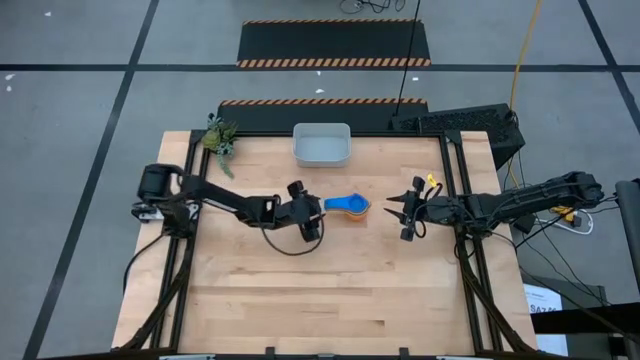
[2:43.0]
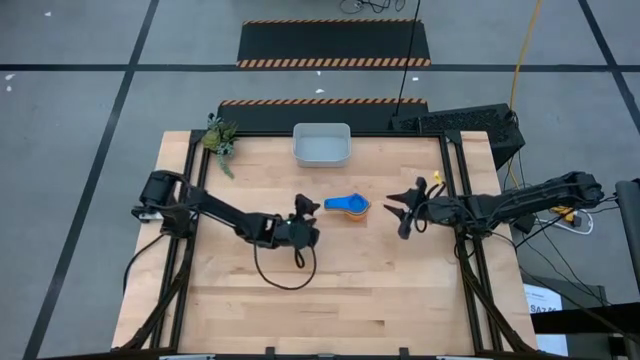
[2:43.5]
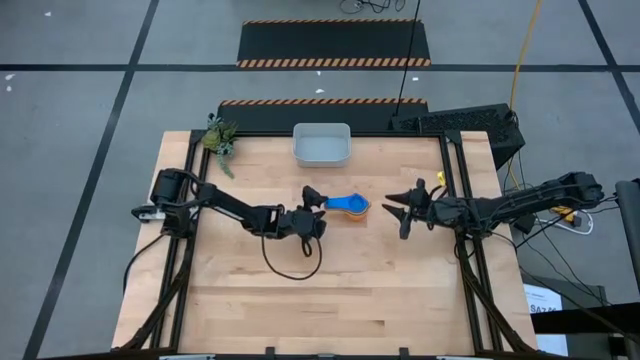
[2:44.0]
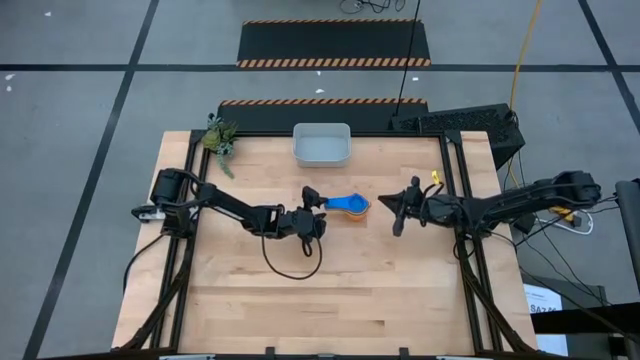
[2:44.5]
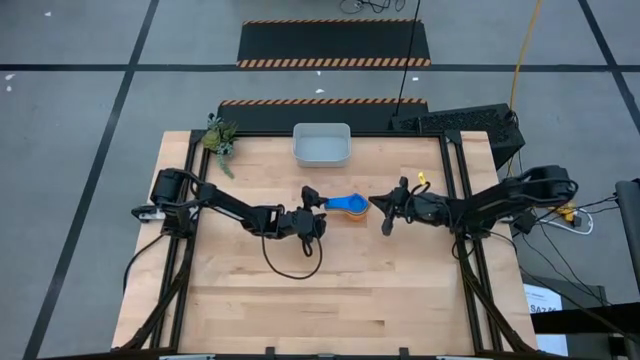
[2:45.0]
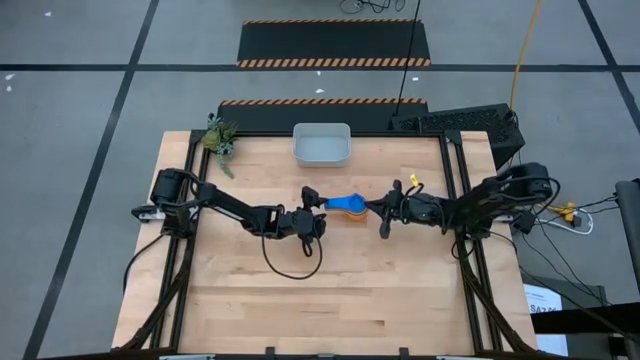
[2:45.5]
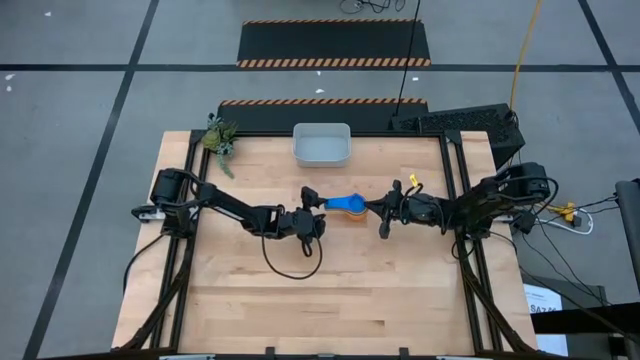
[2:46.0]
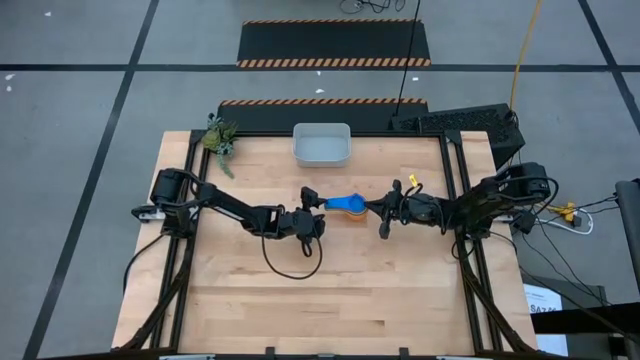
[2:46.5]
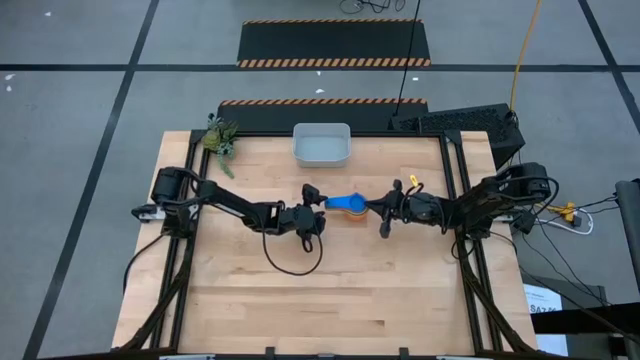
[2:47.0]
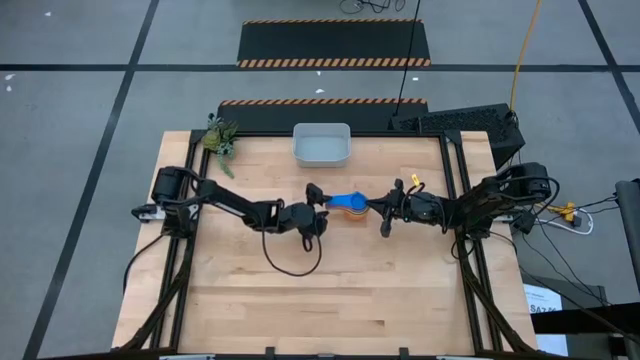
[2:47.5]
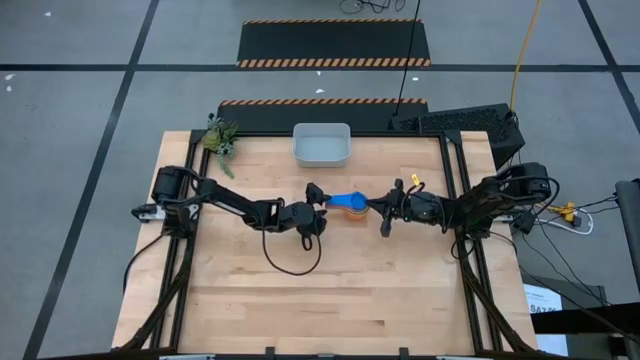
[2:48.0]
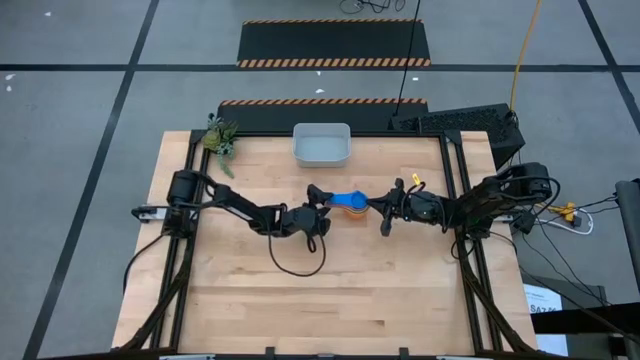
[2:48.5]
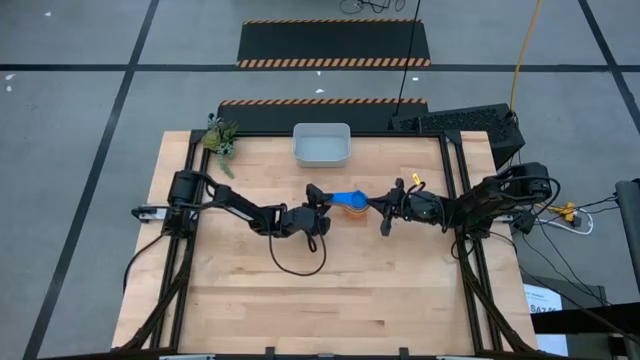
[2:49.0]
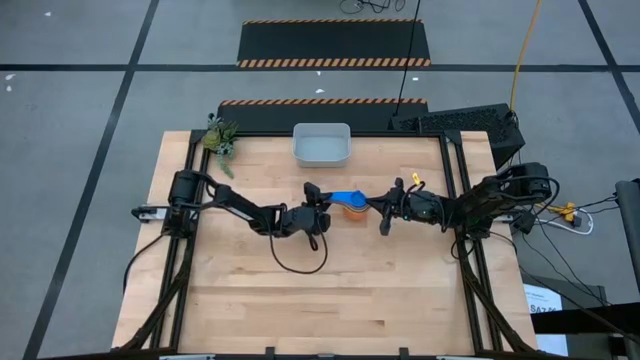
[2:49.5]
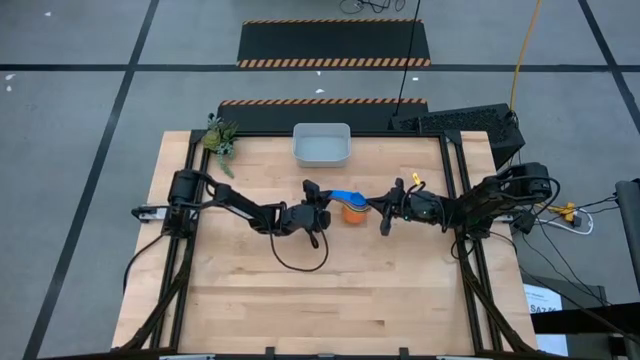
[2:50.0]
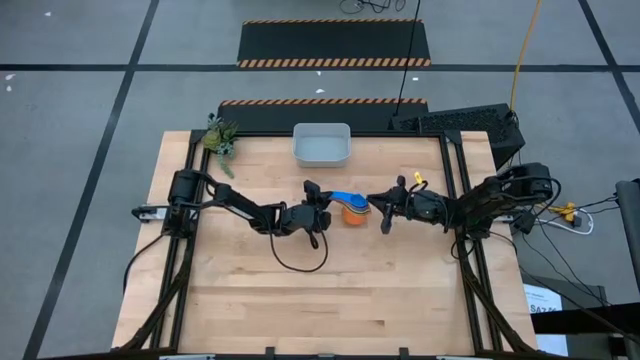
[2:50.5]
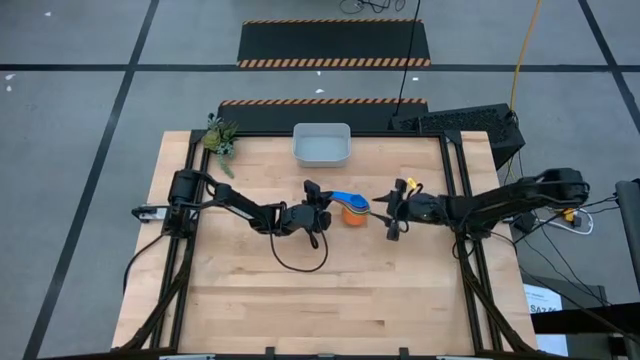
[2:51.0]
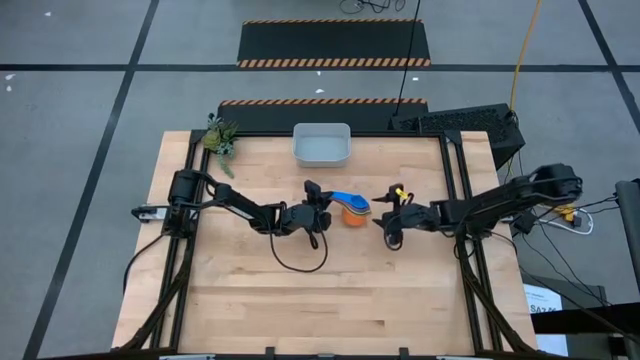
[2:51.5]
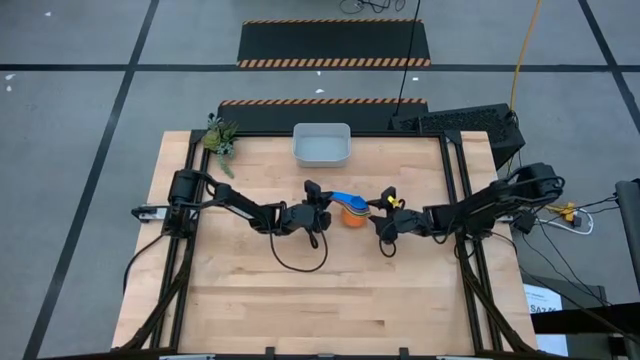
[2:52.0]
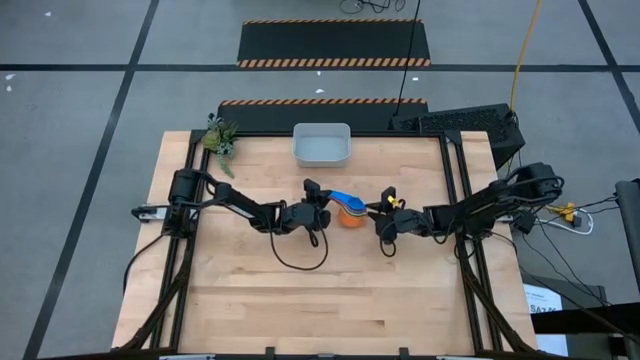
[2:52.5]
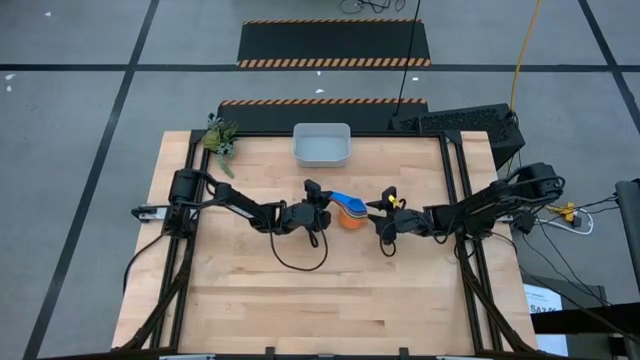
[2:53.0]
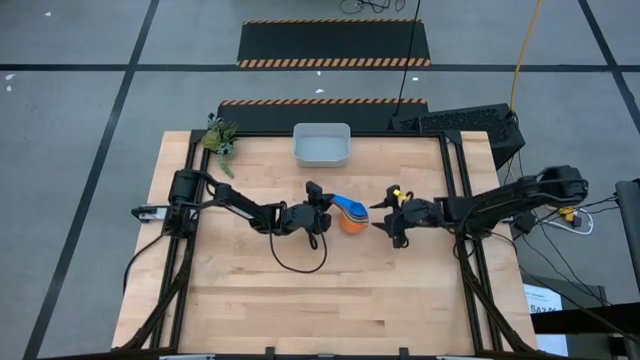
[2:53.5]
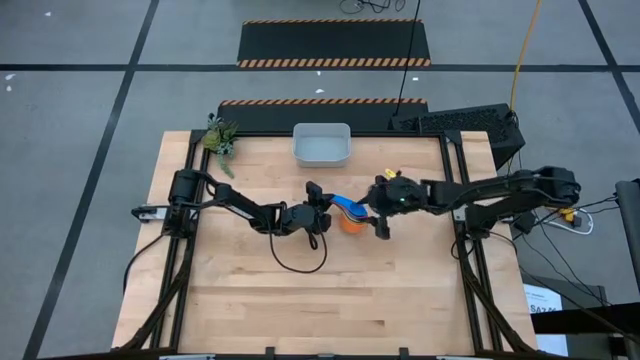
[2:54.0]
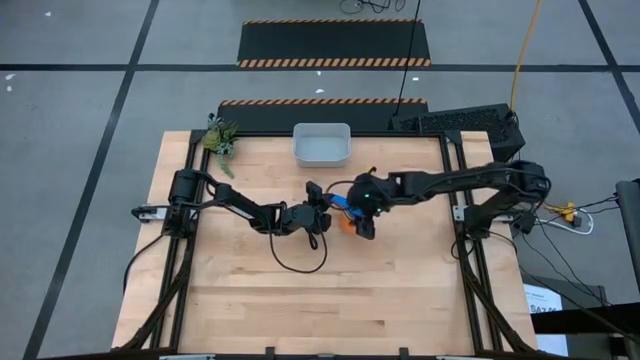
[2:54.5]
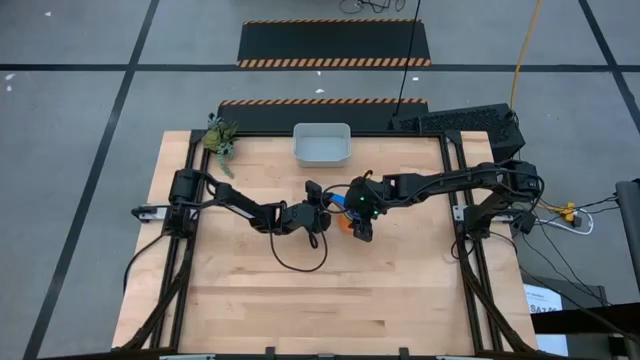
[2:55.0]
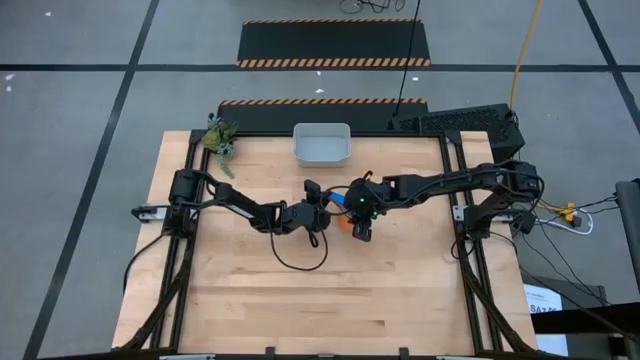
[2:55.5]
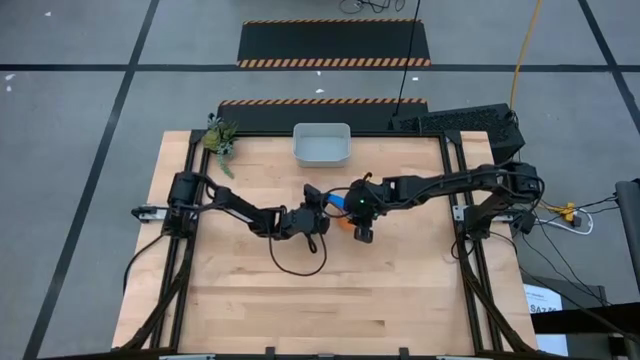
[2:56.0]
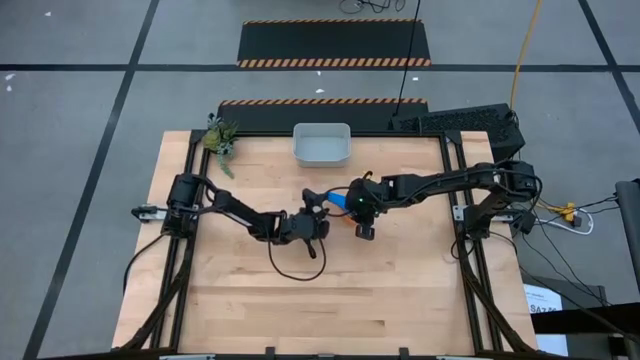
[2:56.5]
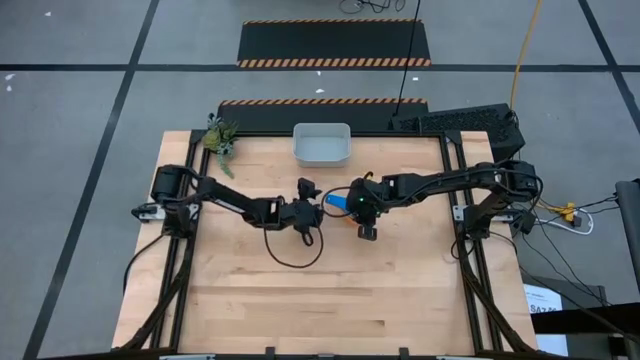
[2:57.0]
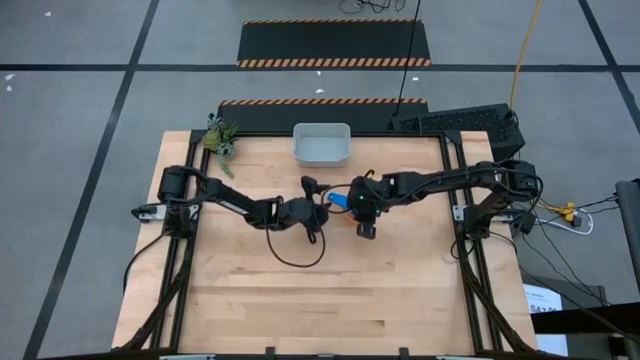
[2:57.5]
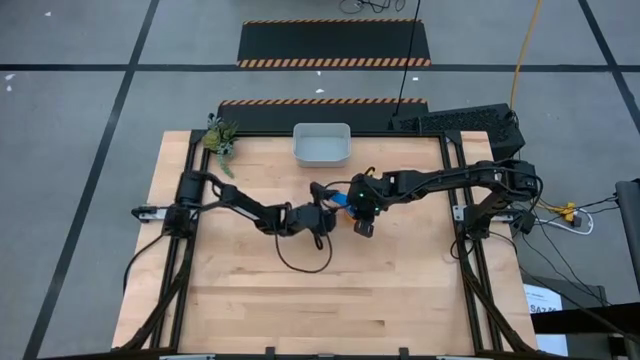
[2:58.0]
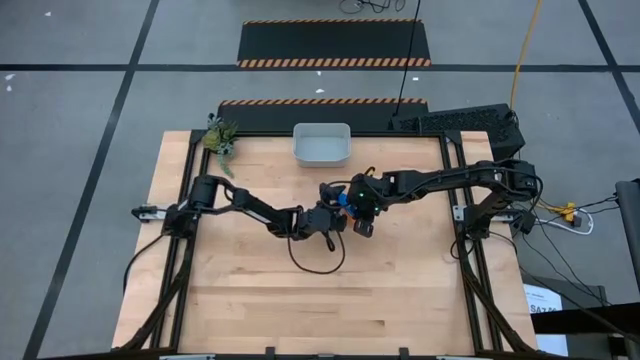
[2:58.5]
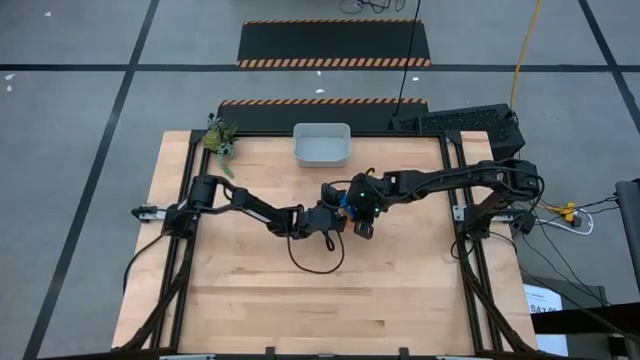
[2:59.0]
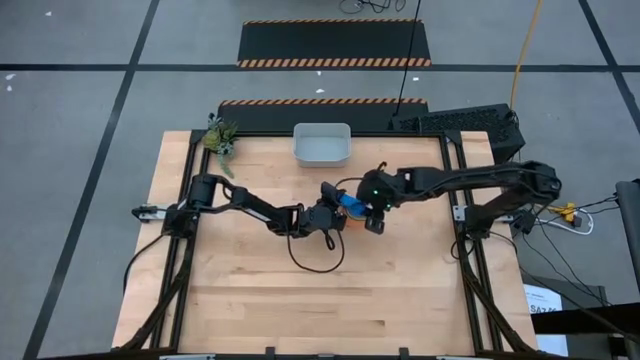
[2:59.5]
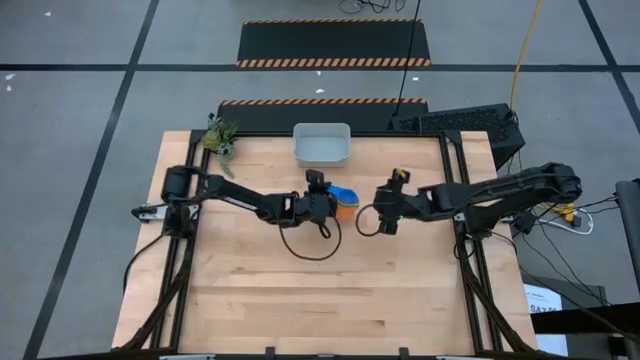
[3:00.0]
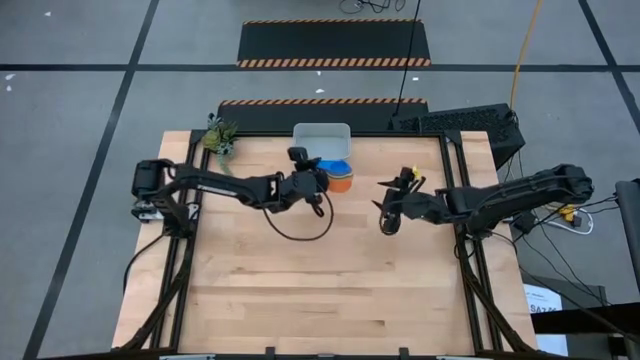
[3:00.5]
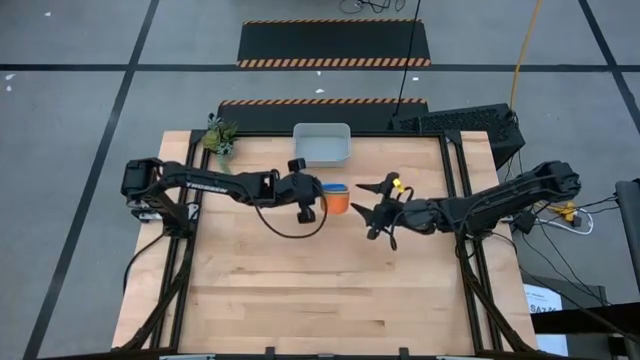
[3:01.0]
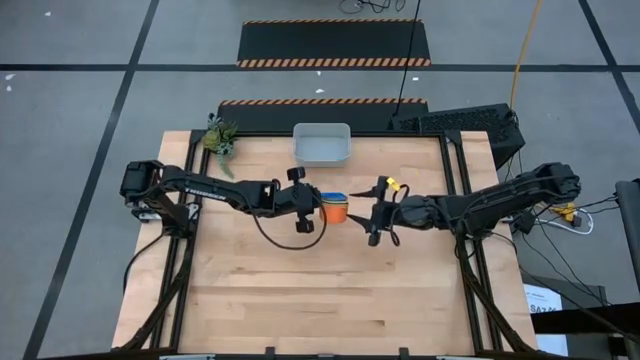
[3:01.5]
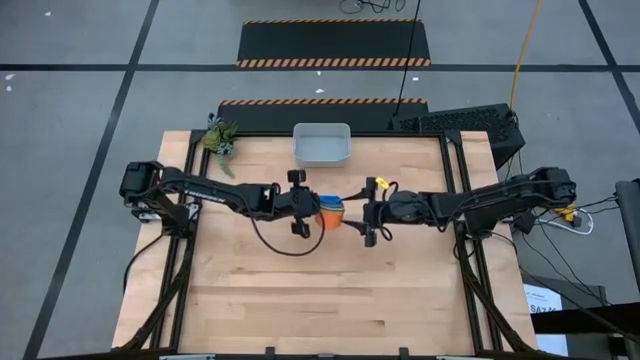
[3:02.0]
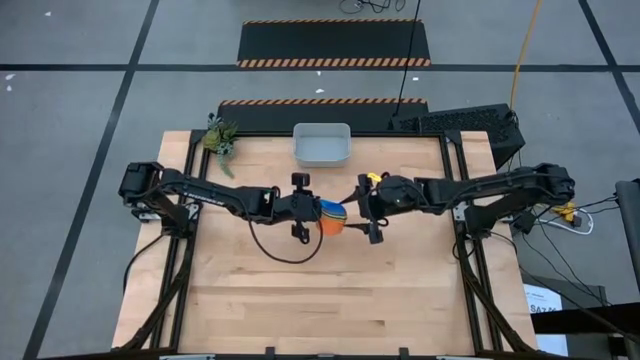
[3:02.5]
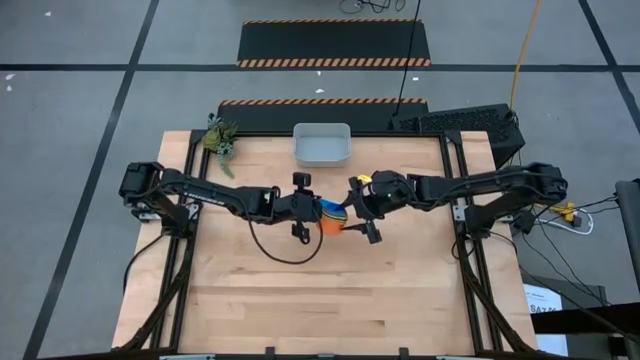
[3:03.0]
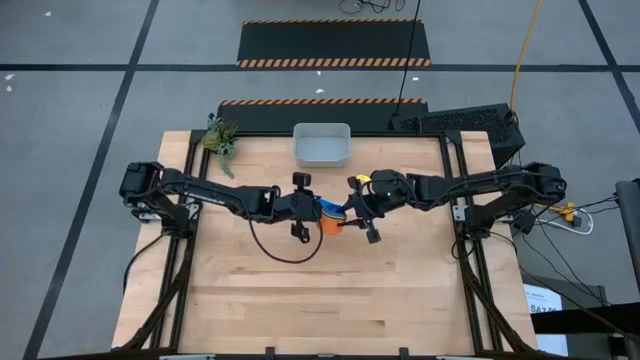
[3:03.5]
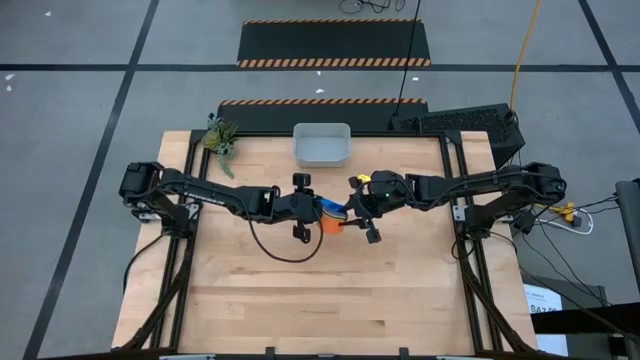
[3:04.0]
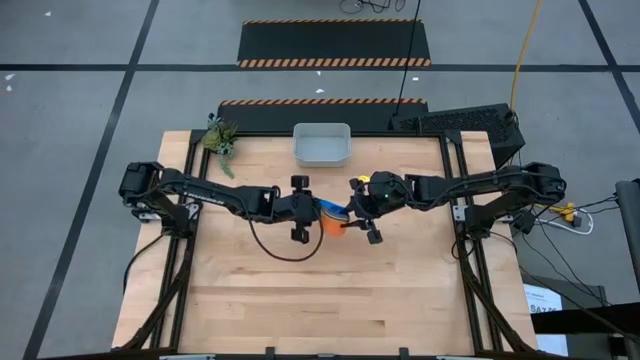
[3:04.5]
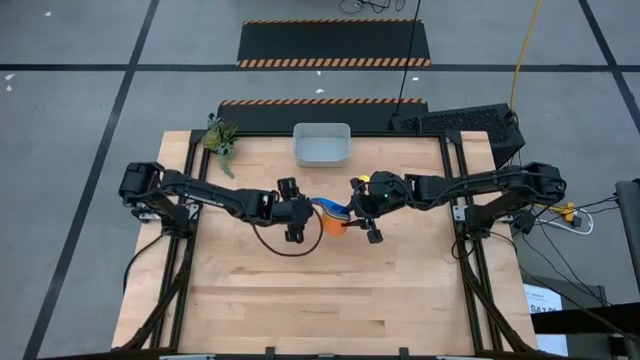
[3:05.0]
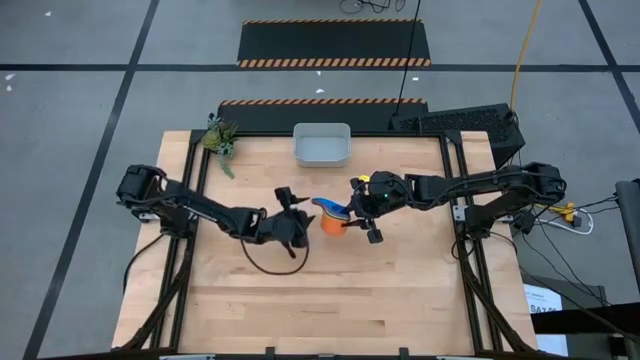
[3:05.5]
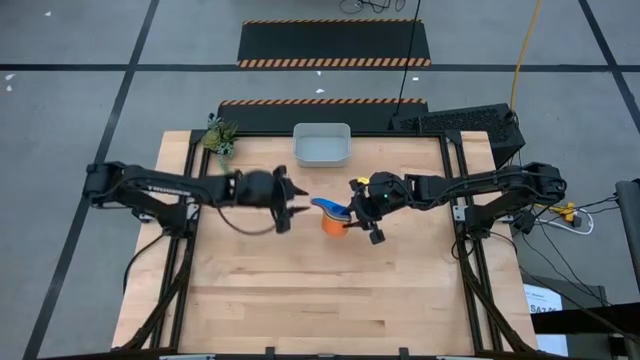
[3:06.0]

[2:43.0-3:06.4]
Task: Nest measuring cups in basket
Put the stack of measuring cups into the gray bin
